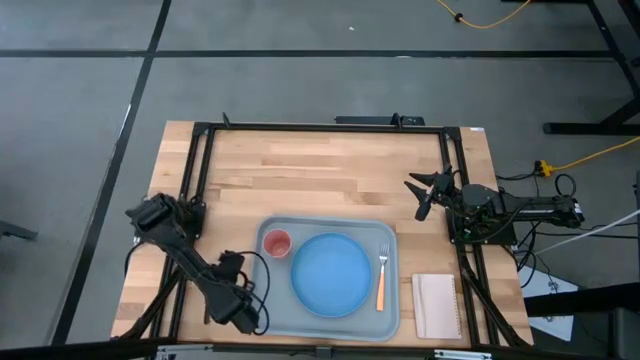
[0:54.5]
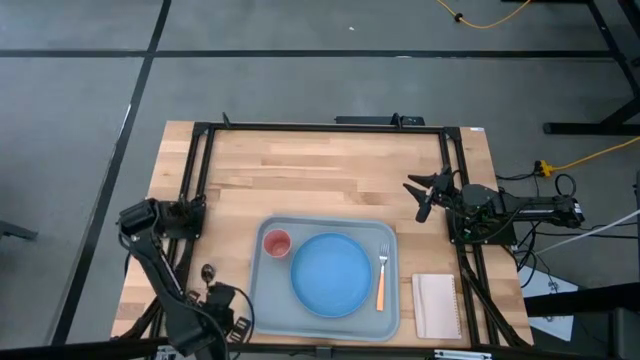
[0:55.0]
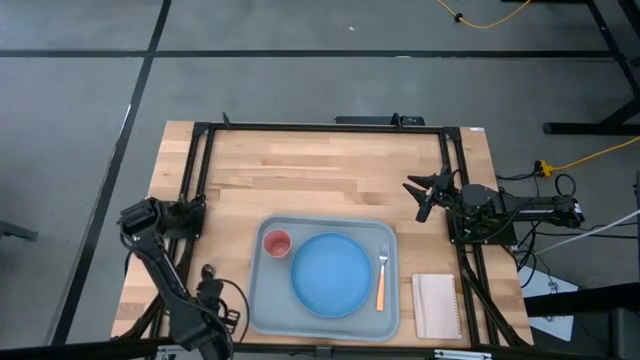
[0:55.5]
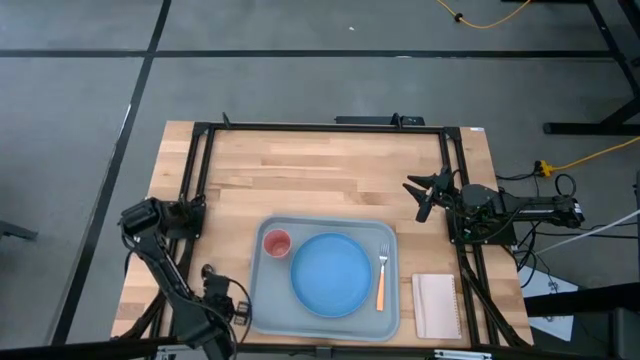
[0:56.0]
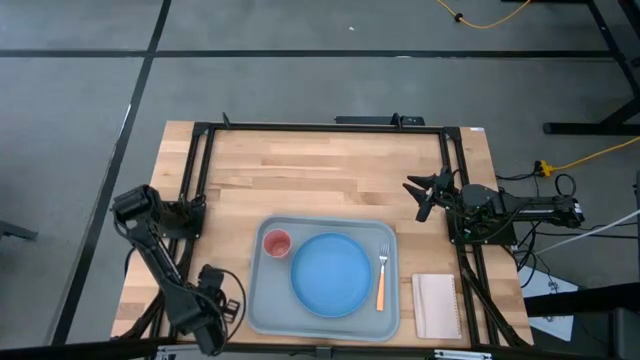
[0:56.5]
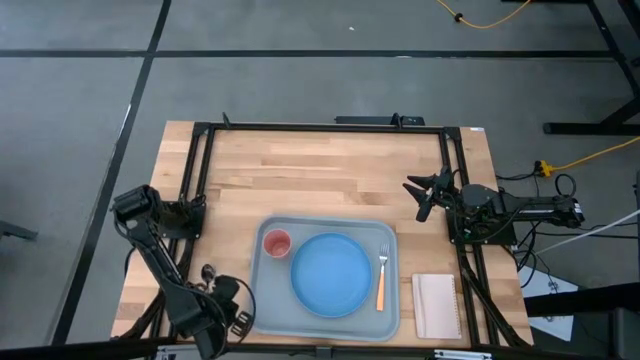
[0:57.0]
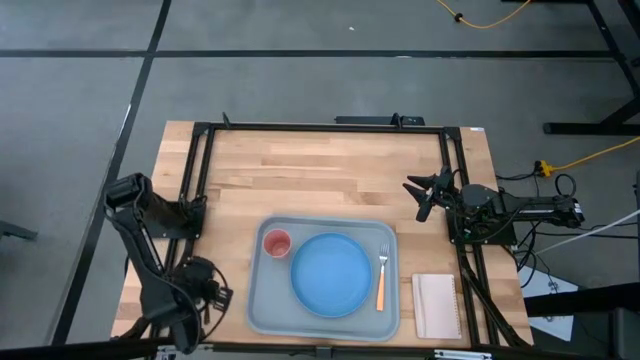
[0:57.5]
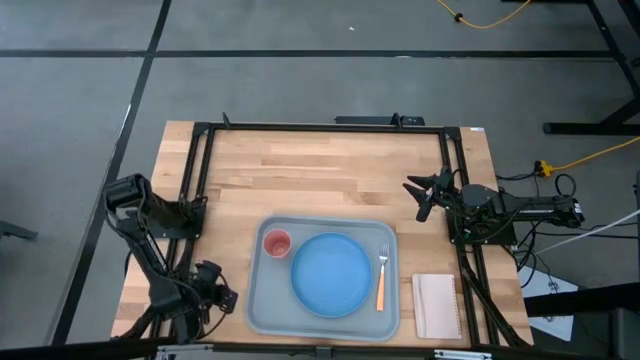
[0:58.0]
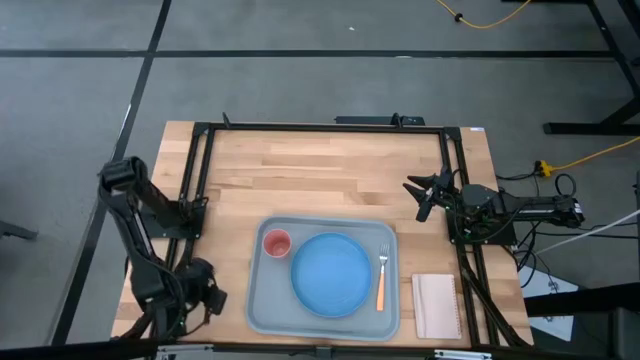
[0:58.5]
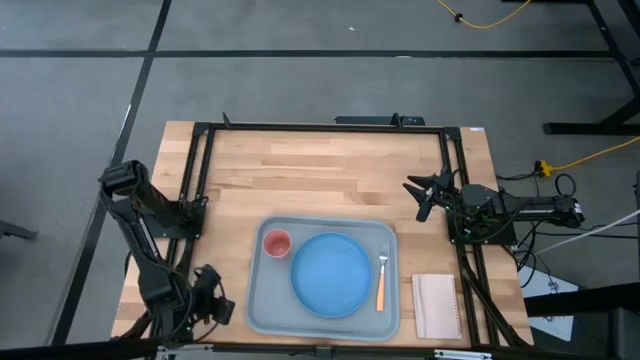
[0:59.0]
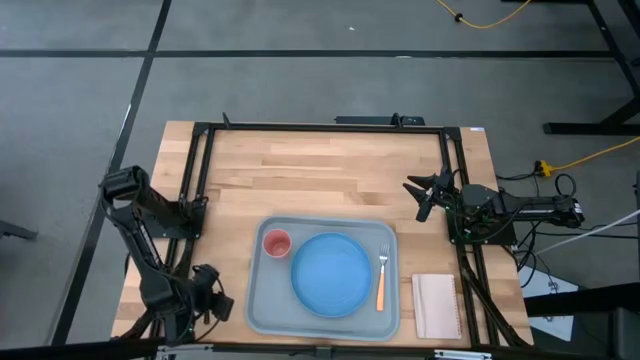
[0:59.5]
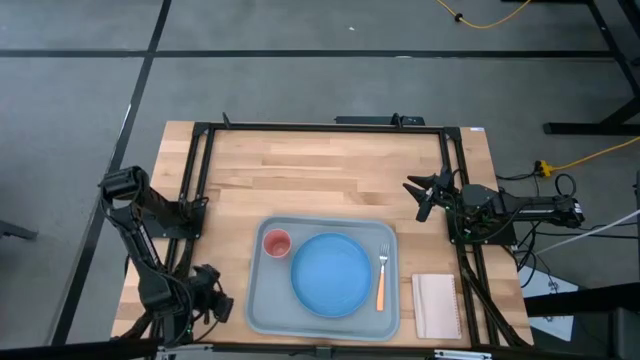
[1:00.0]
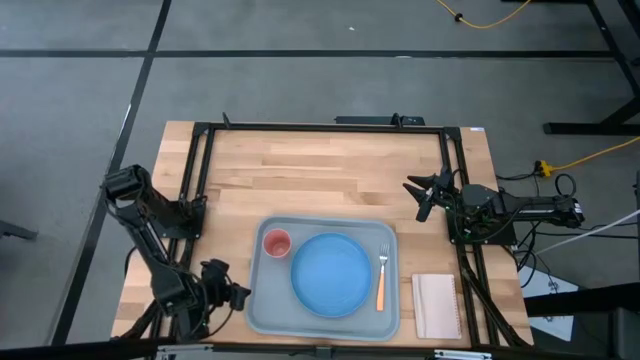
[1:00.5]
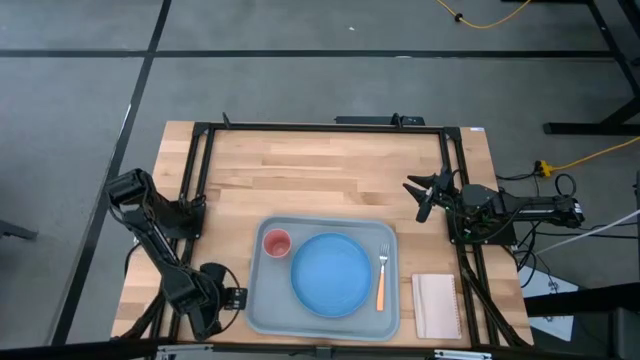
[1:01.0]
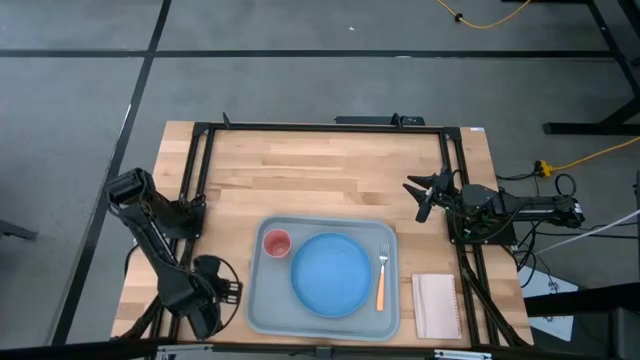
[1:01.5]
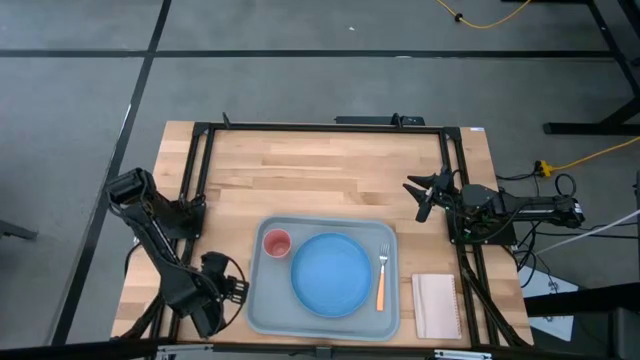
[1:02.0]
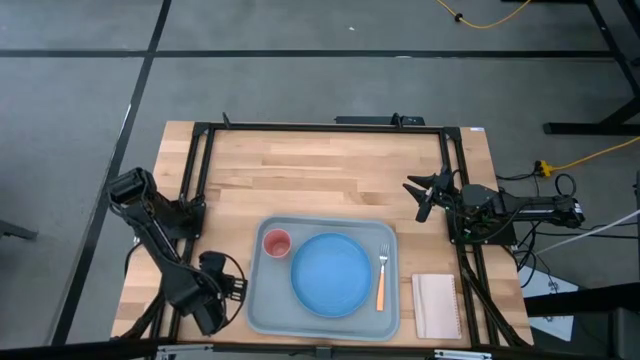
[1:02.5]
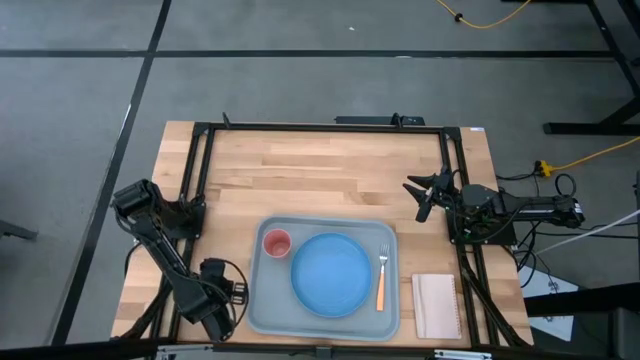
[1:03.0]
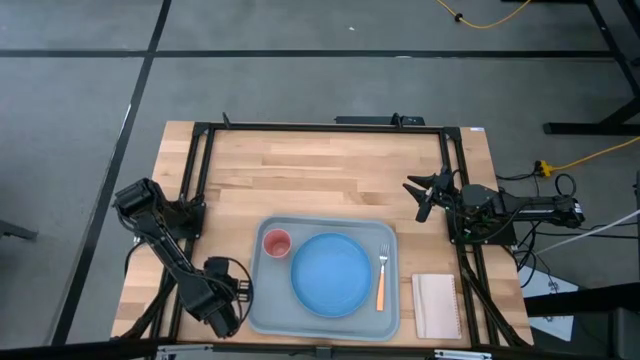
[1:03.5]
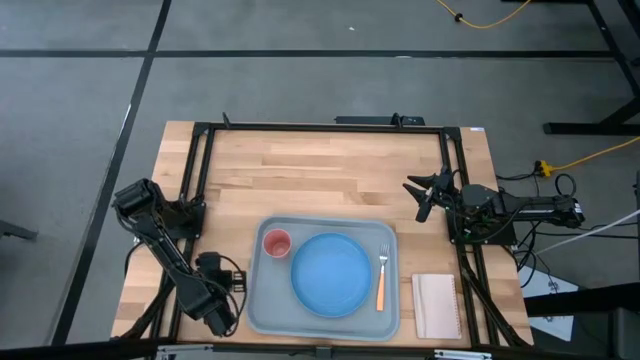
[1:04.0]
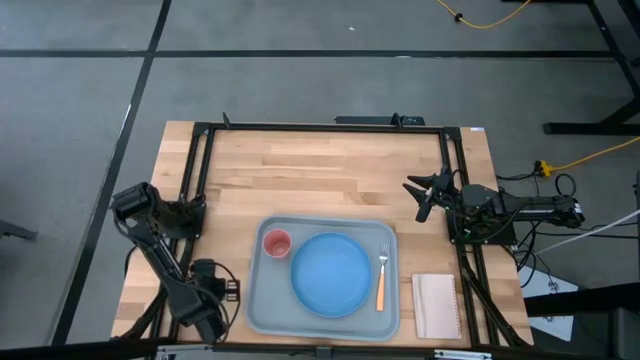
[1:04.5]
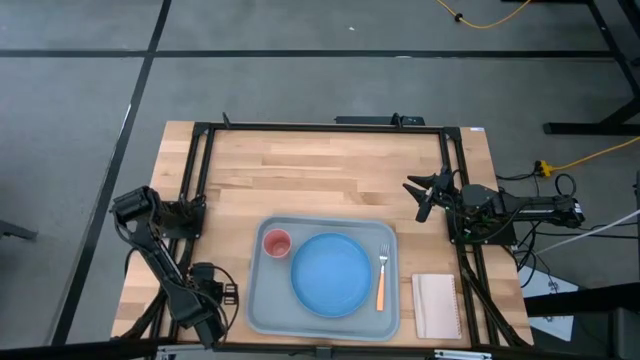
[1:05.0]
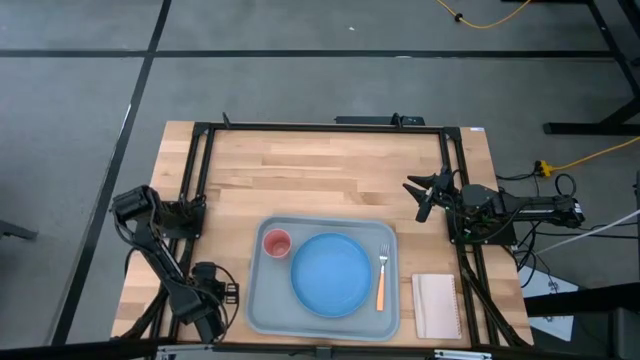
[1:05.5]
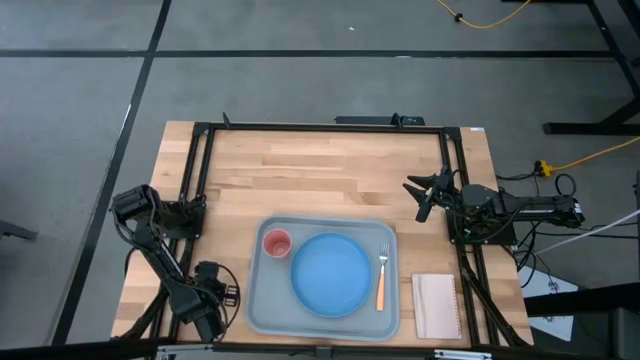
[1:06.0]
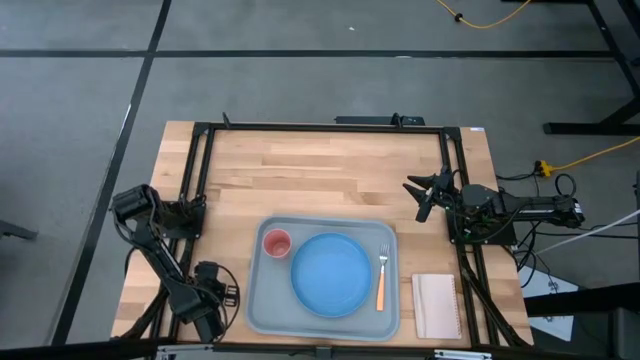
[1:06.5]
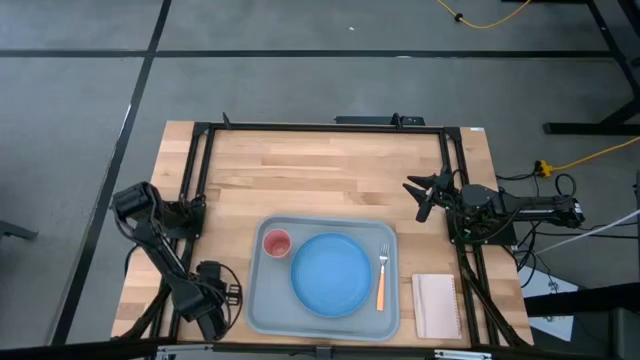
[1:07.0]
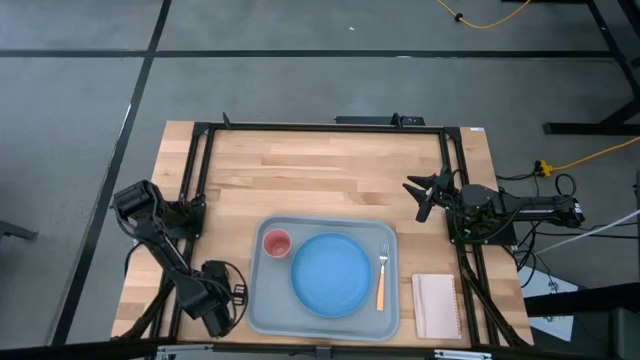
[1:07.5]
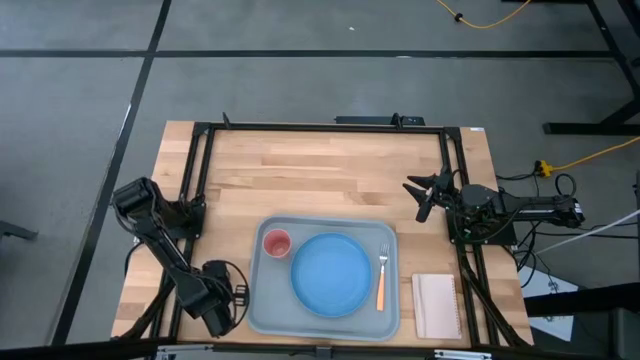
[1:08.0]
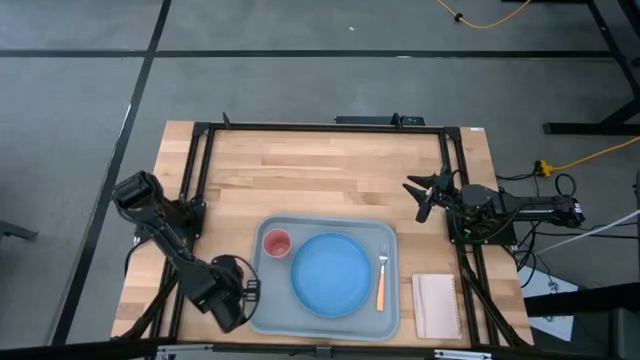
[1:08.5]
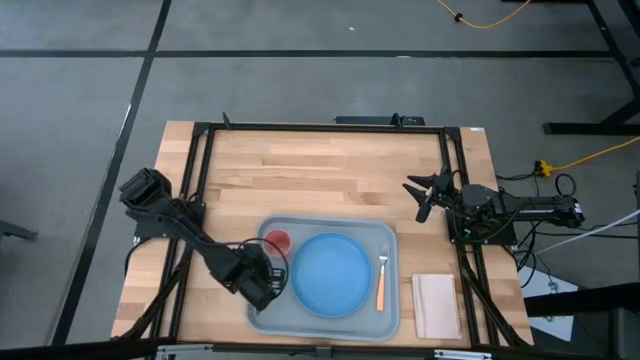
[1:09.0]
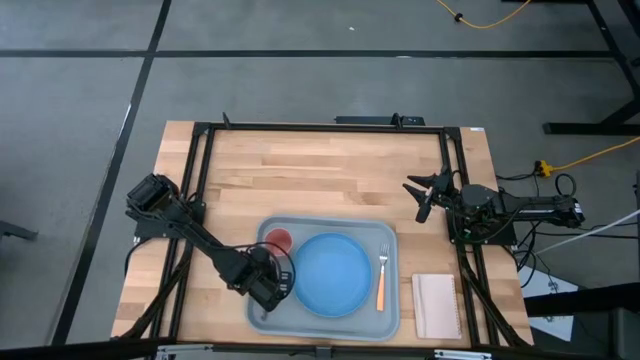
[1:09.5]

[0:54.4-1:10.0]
Task: Pick and place plate/cup/fork/spoon on tray
Put the black spoon on the gray tray on the left of the blue plate

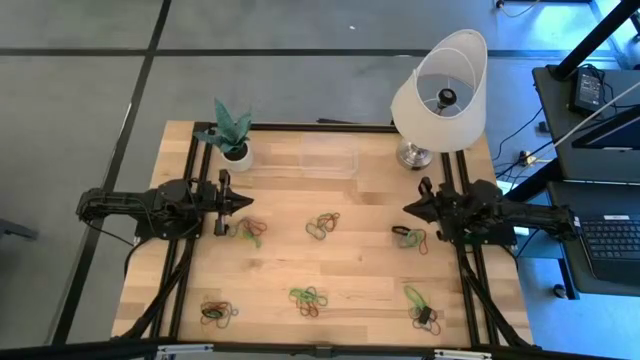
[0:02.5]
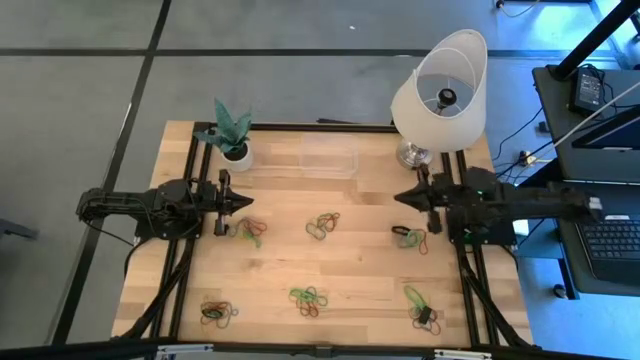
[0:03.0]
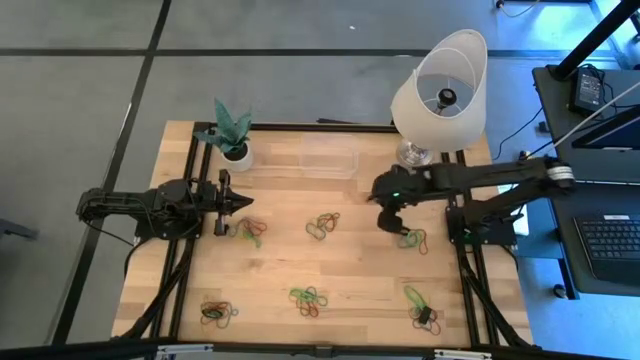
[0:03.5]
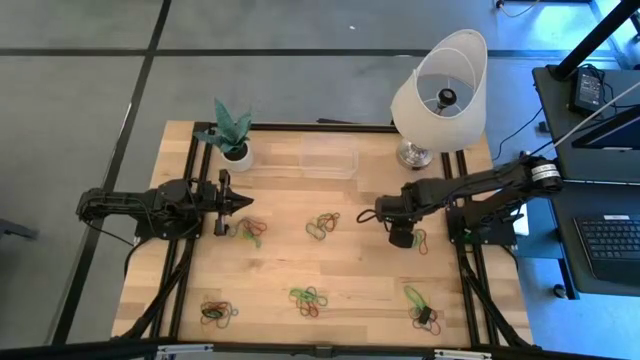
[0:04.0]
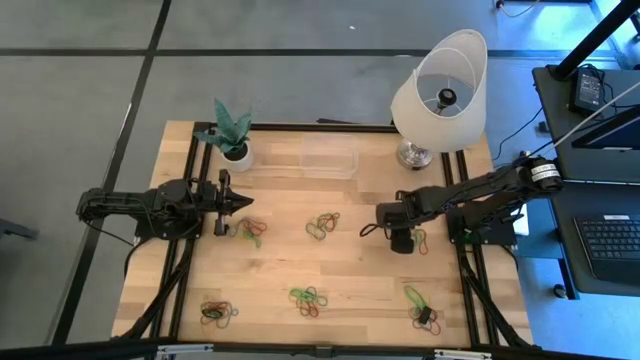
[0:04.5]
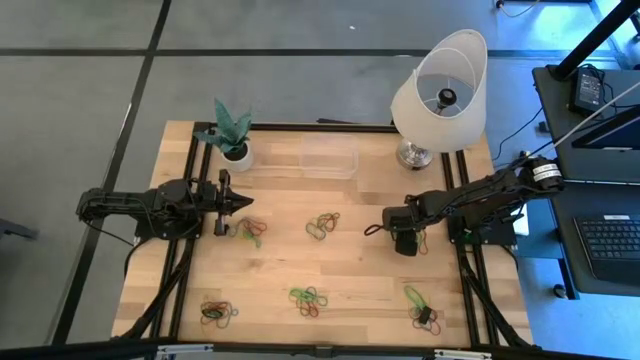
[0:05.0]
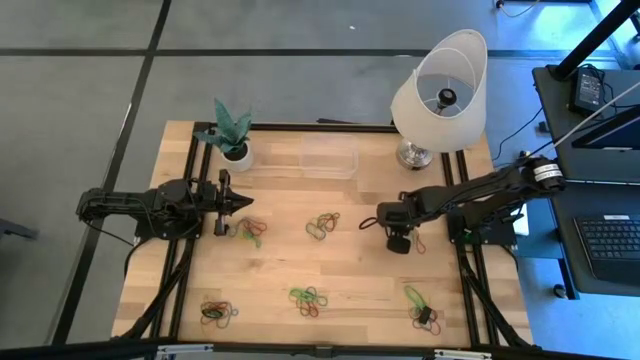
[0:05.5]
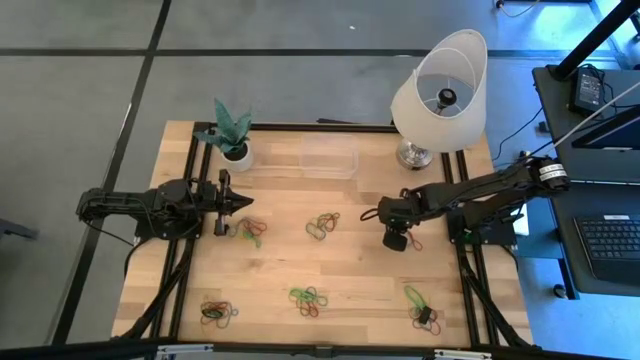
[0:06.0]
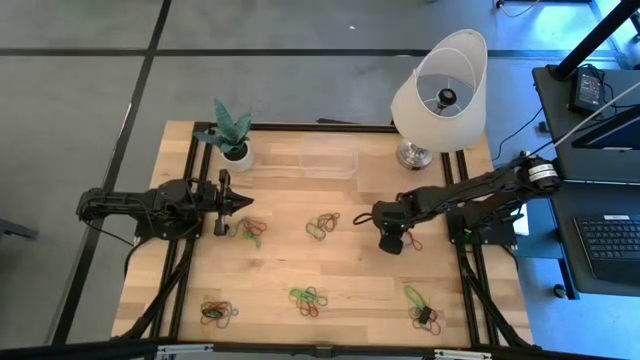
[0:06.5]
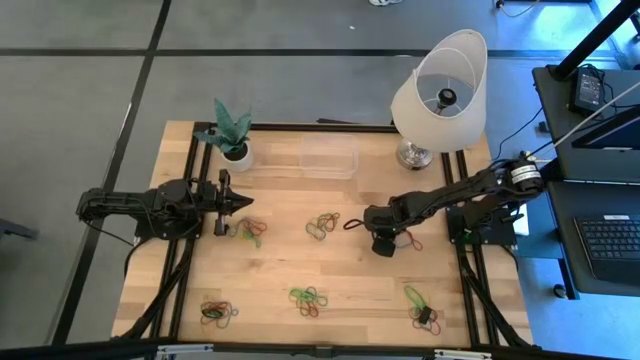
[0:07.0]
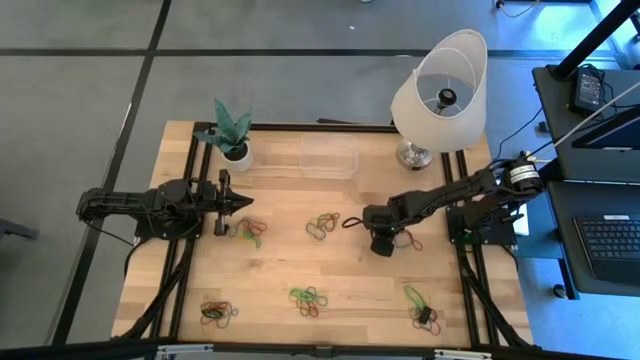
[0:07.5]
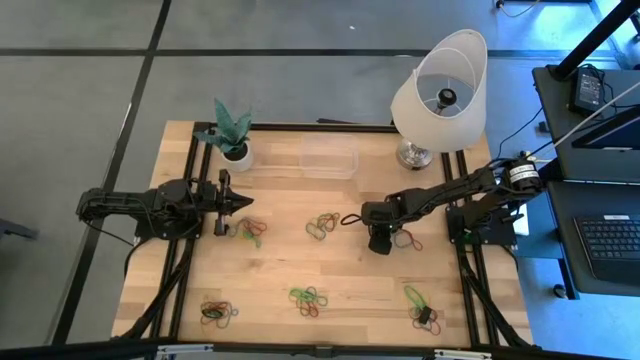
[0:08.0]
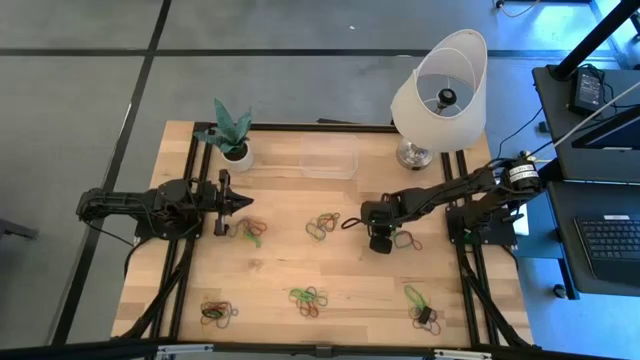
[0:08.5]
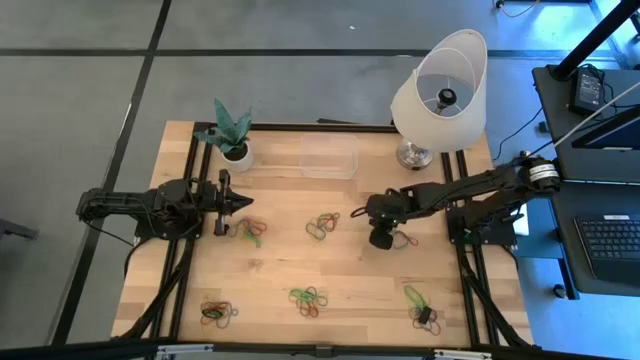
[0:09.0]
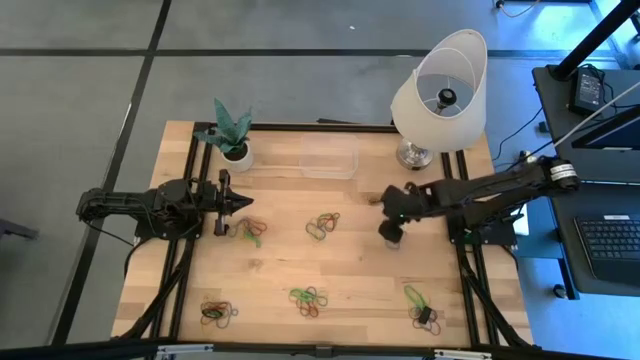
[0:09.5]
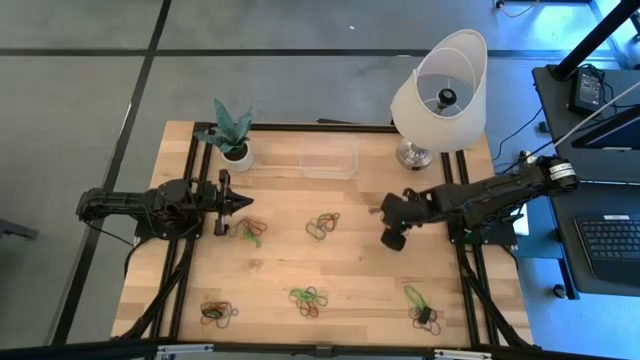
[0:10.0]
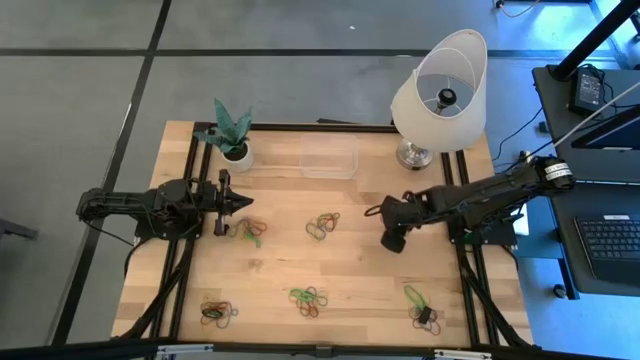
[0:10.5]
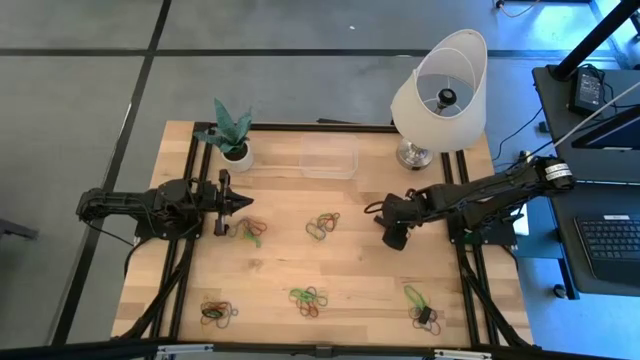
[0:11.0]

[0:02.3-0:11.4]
Task: Pick and place rubber bands into bin
Put the black rubber band into the transparent bin
